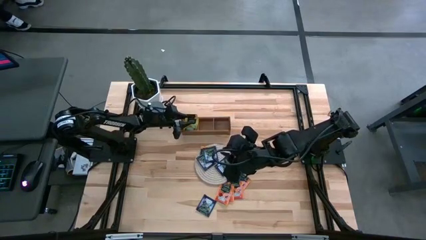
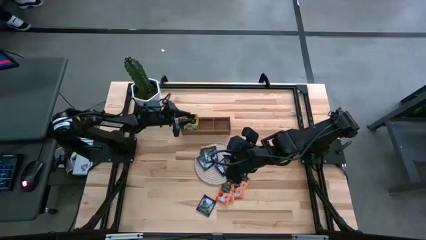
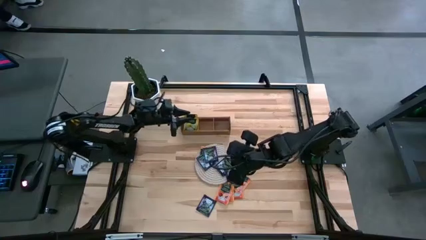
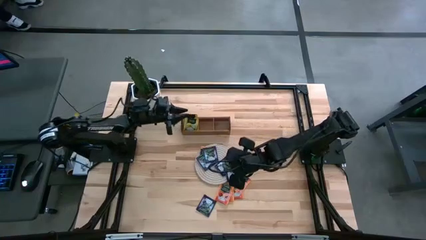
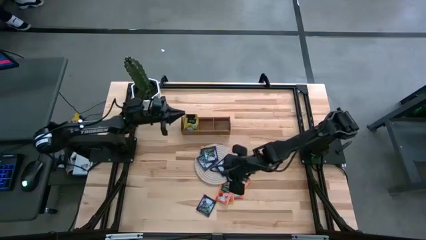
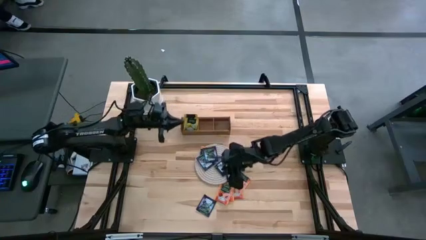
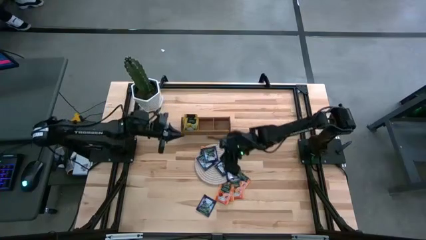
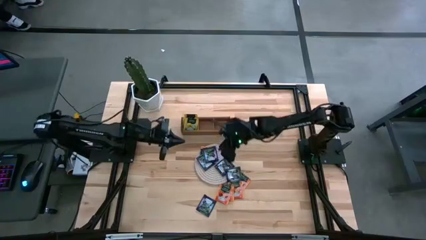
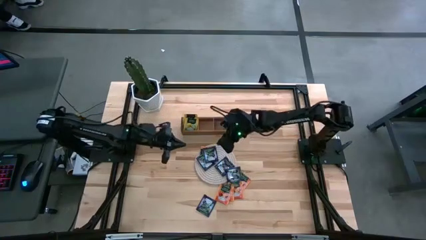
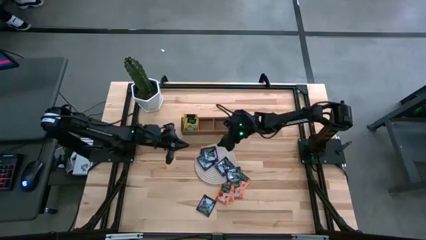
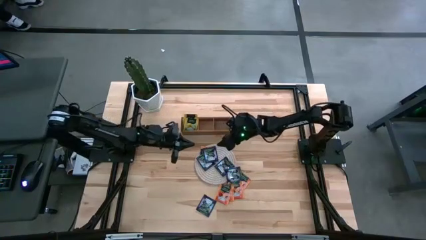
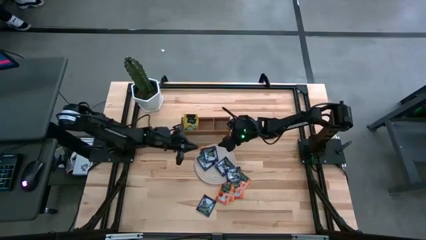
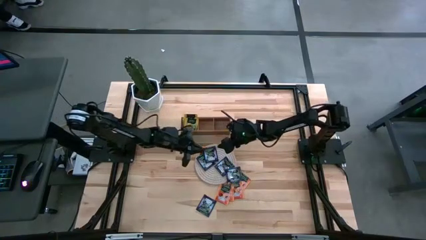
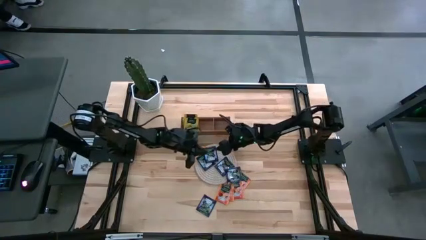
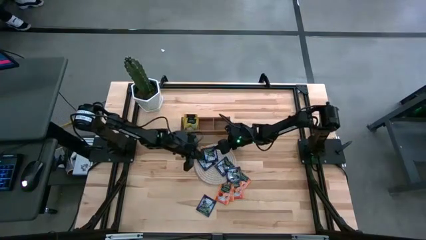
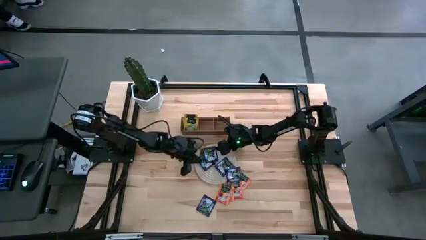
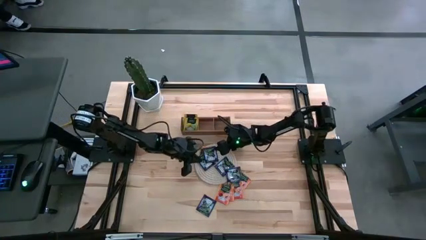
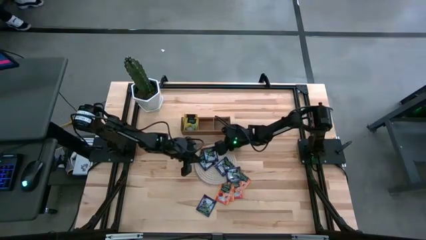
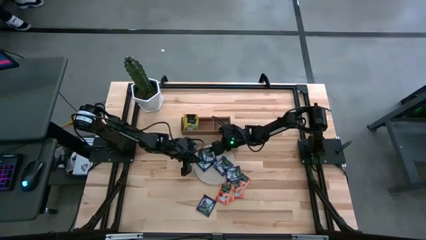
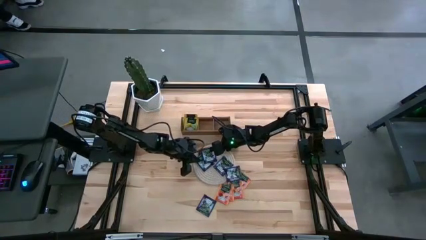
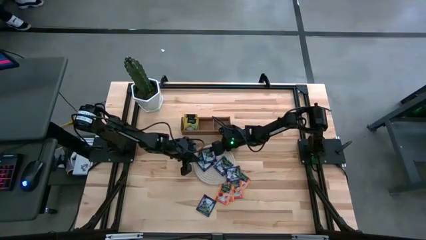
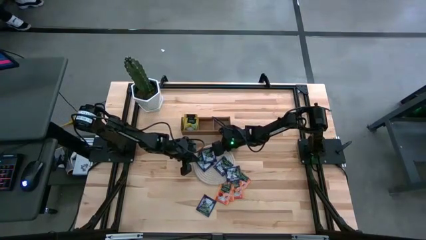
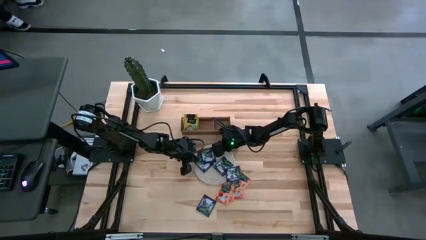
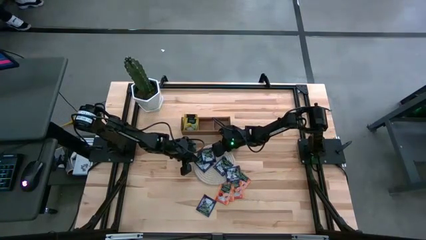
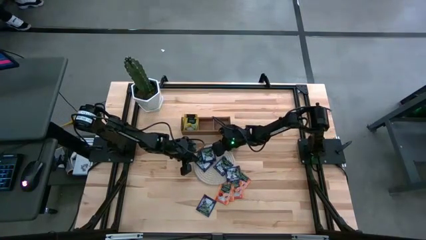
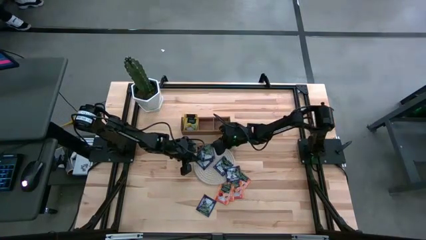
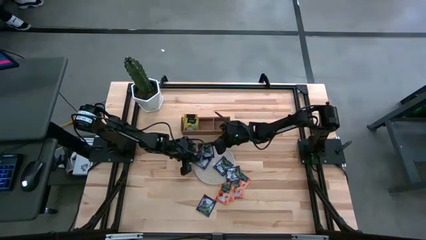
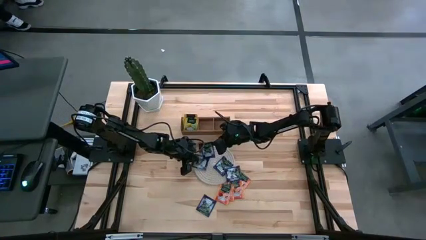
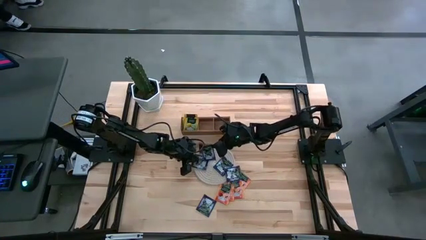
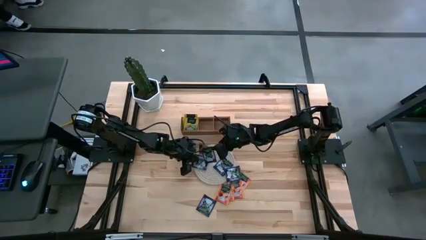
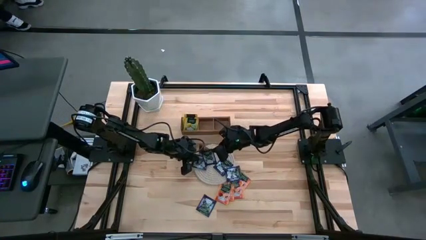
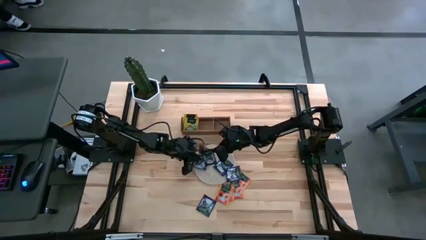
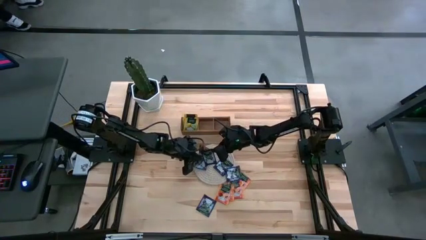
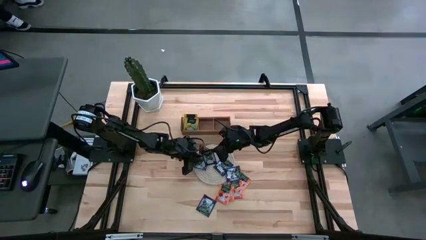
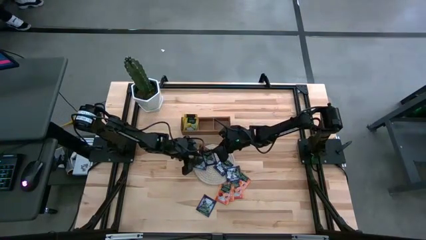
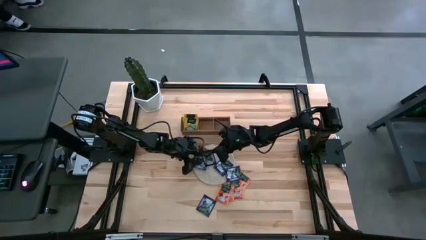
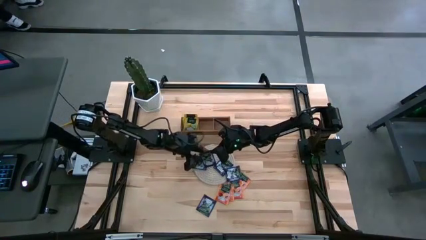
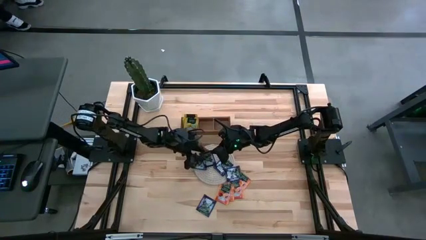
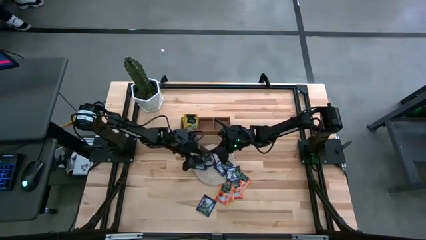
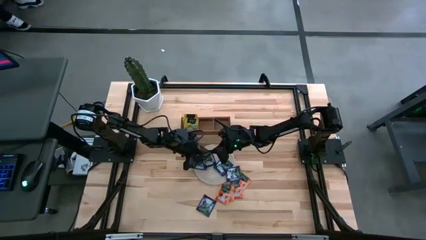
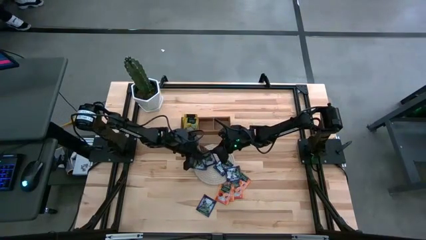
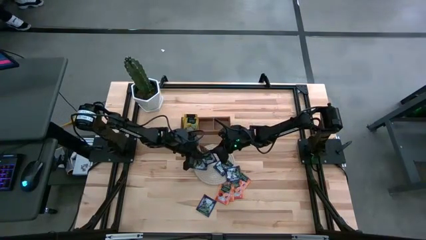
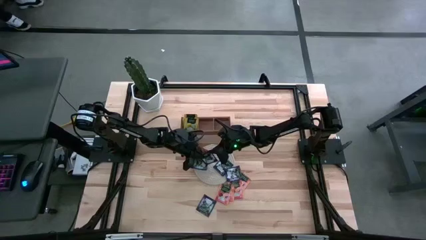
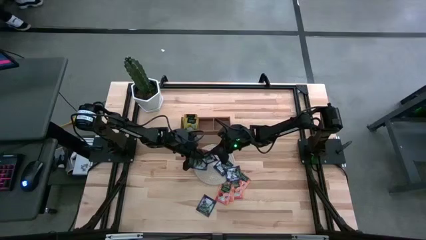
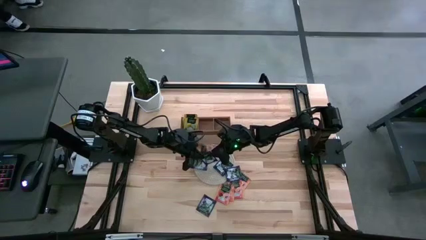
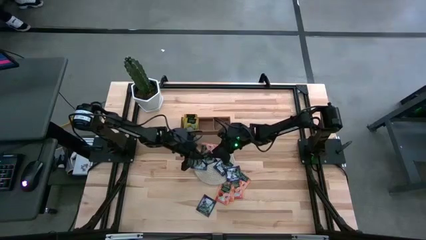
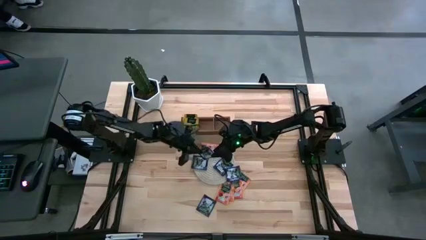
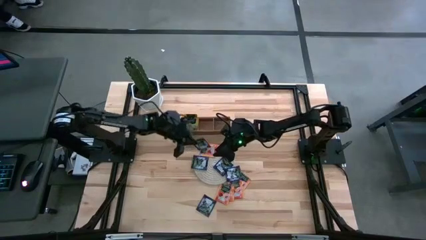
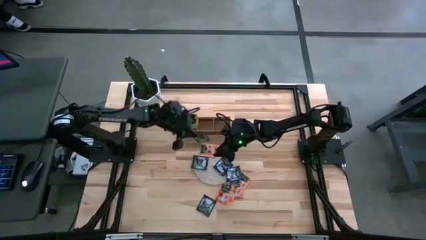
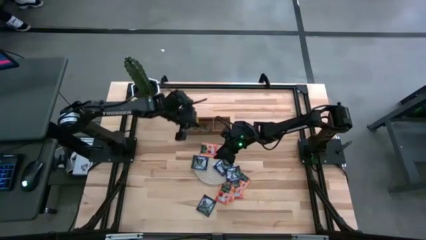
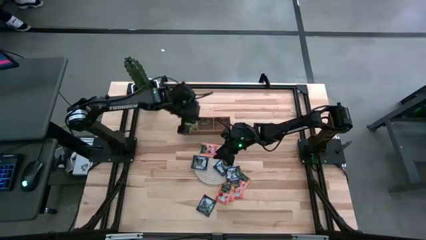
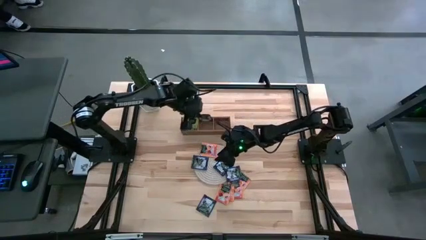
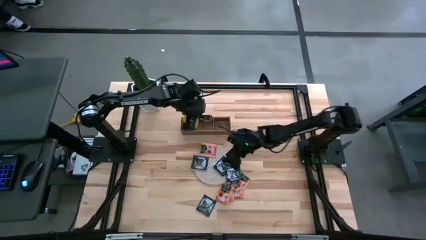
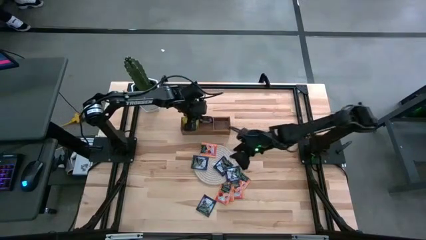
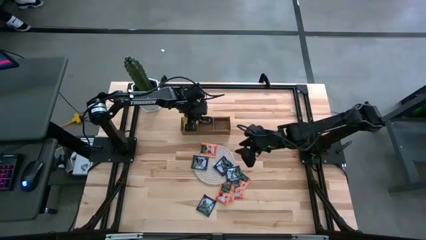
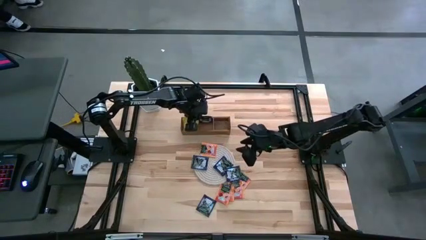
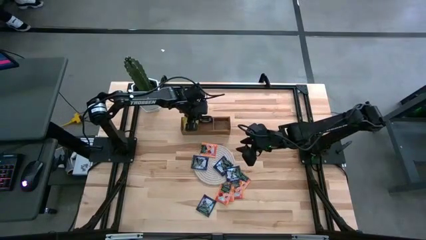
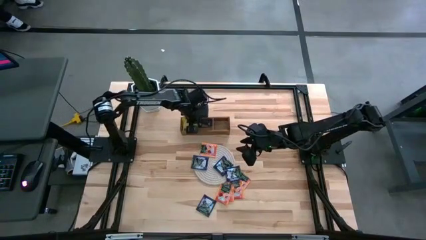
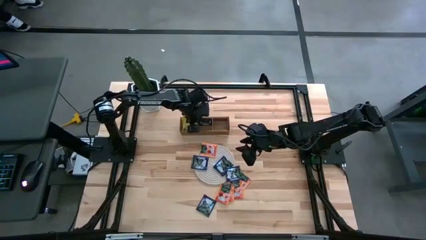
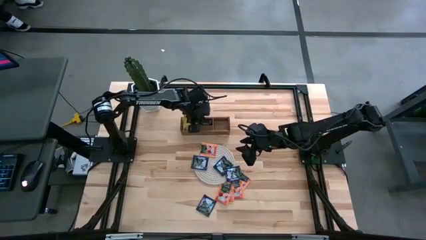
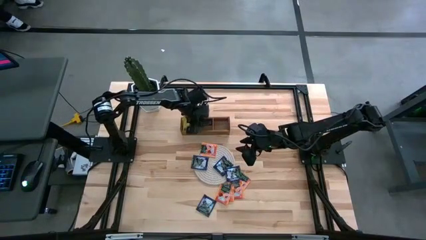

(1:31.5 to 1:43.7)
Task: Pick & Place Tea
Put the purple tea bag into the middle section of the wooden organizer

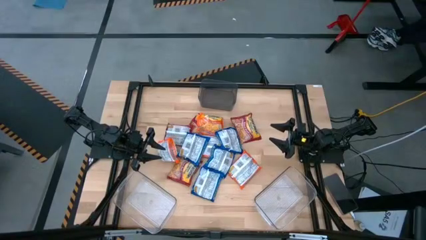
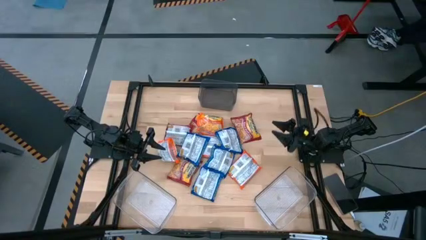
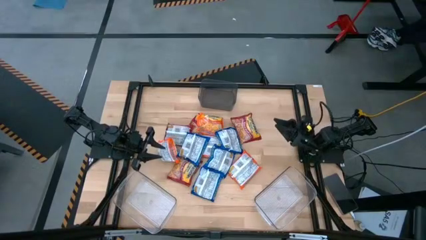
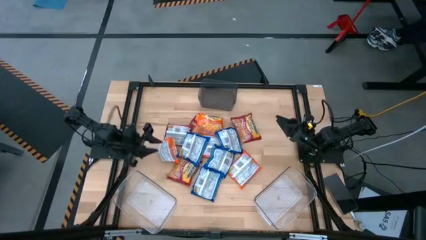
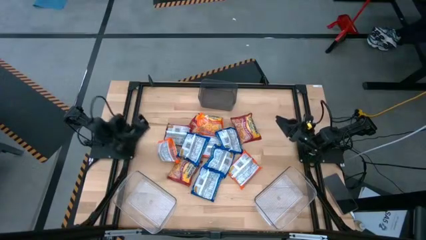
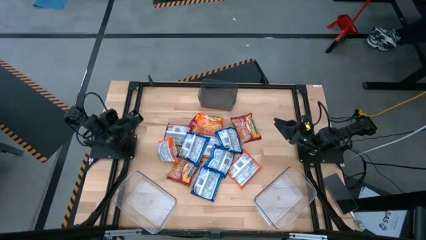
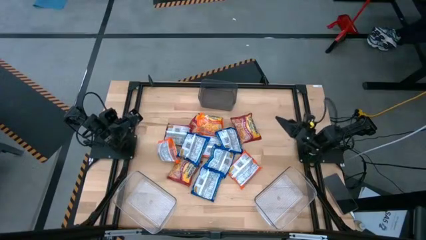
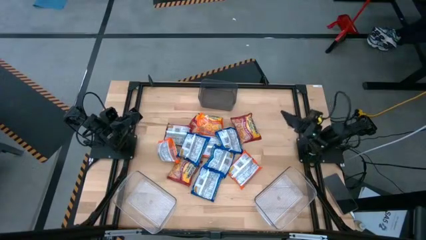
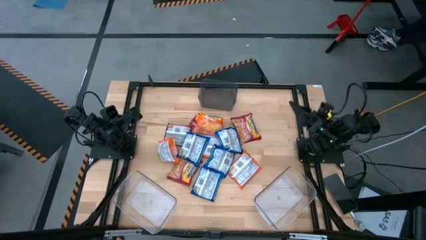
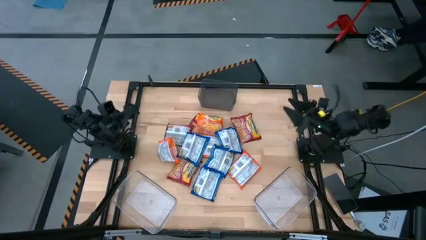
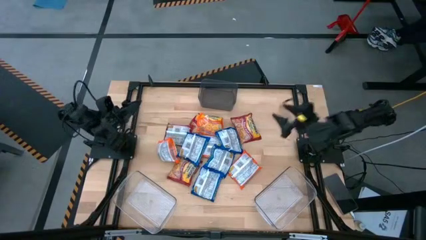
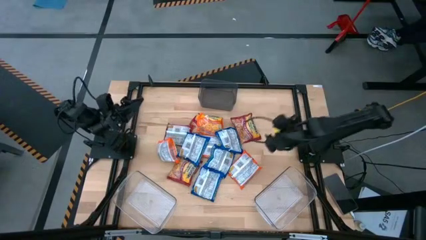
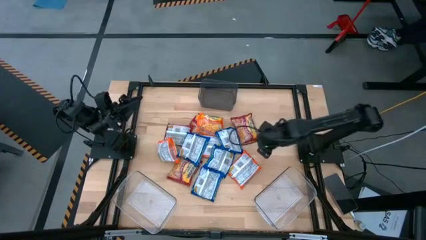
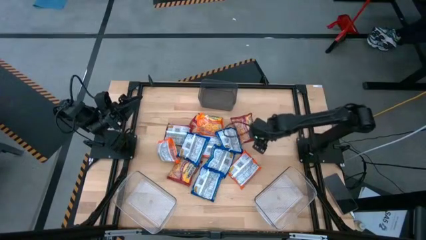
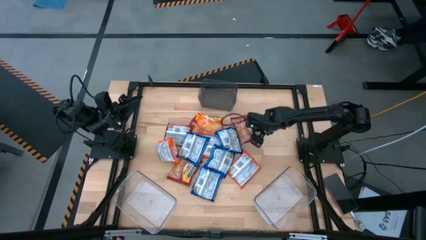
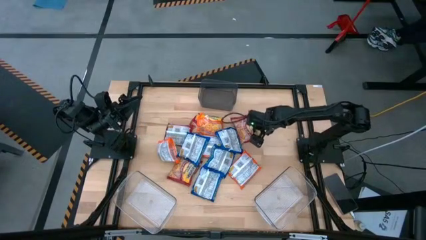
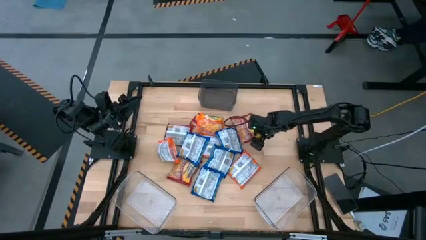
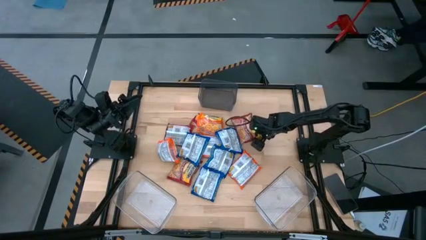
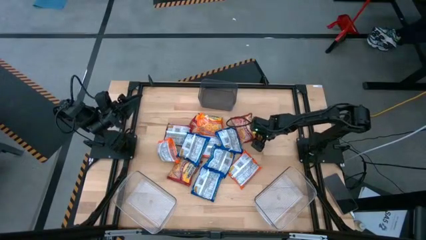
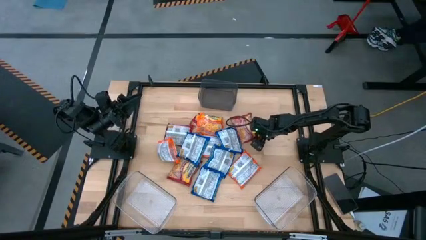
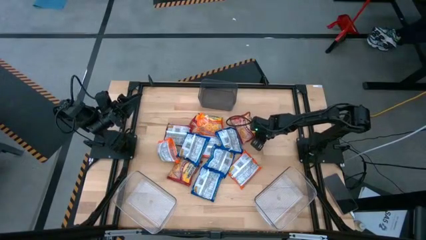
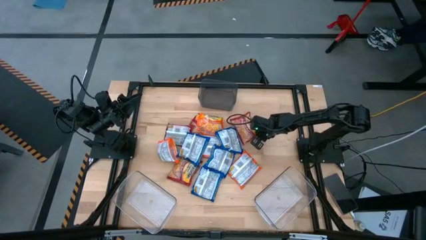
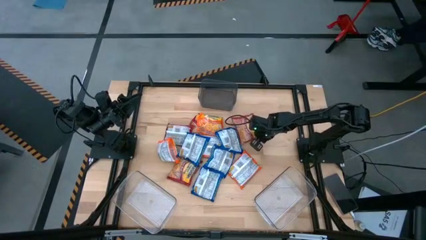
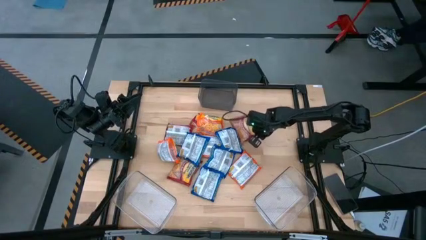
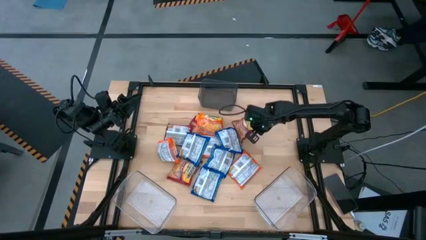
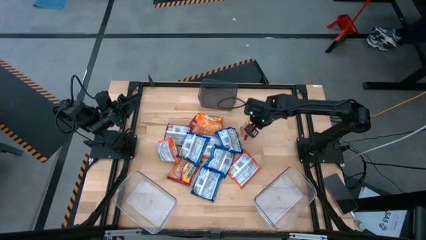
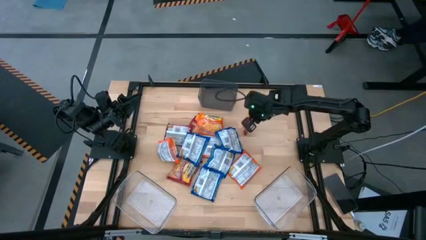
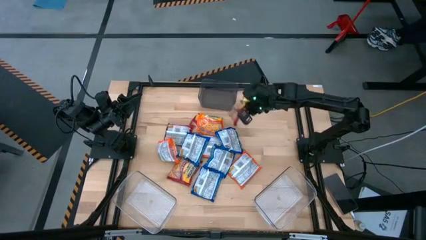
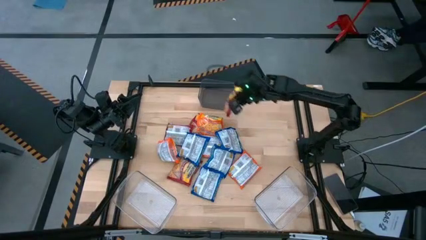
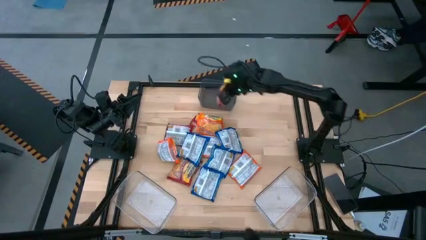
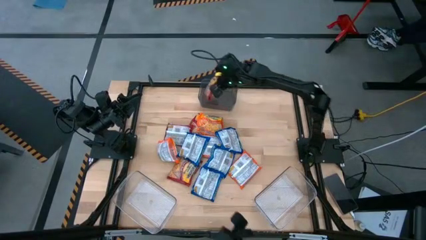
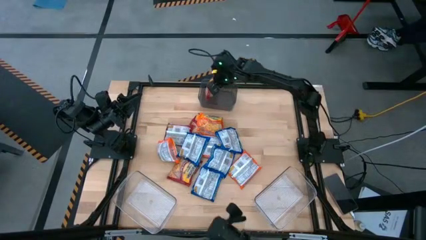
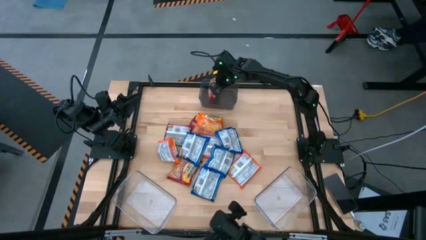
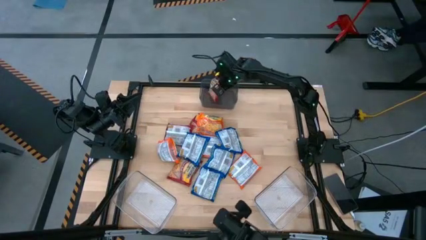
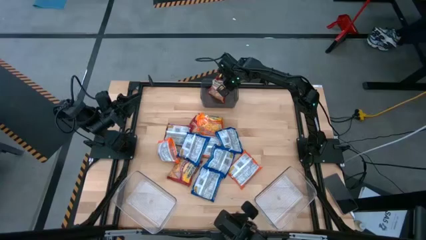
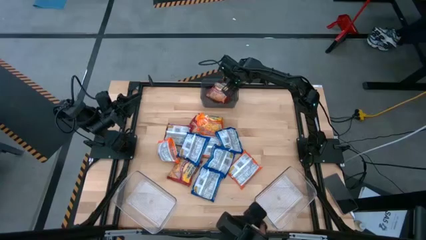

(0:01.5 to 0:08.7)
Task: Sort Maruchan noodles
Put the red noodle pack into the black bin
